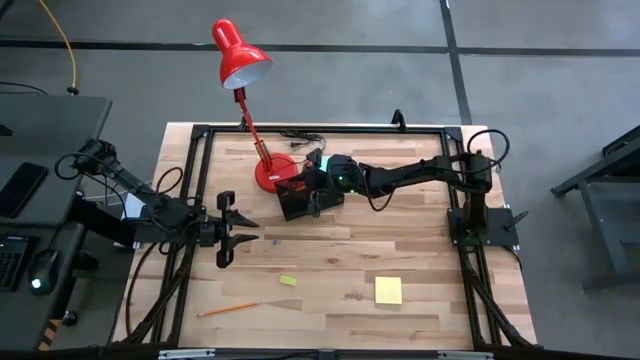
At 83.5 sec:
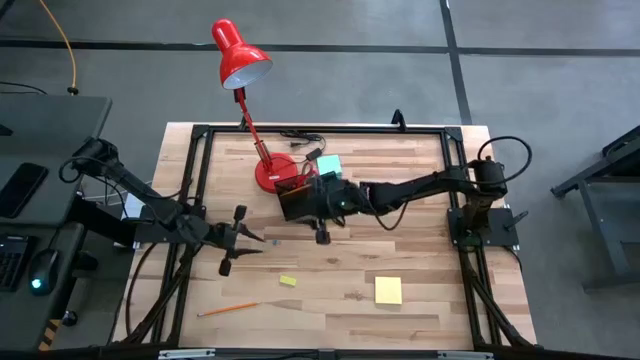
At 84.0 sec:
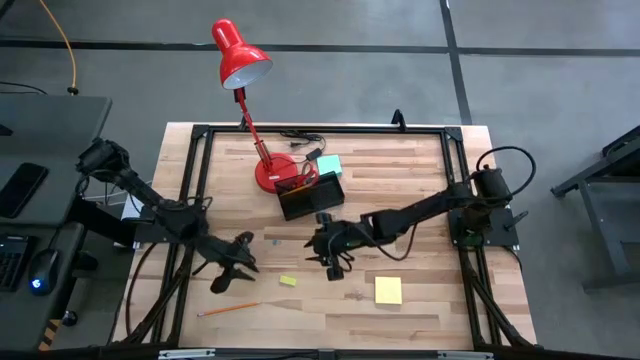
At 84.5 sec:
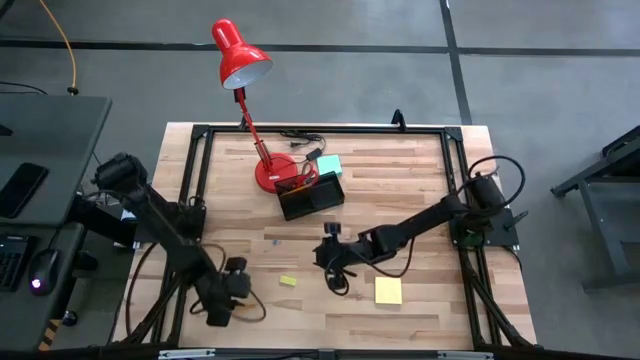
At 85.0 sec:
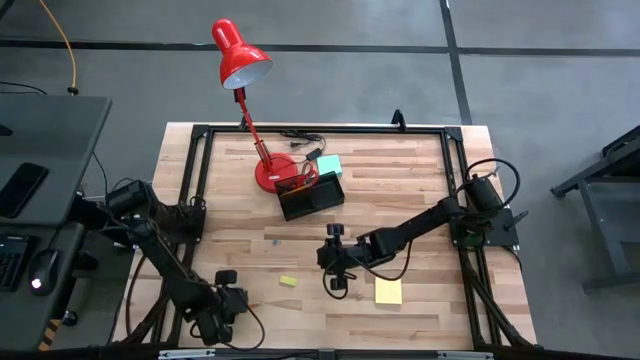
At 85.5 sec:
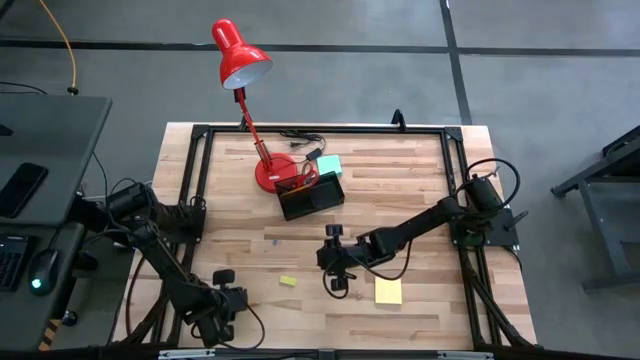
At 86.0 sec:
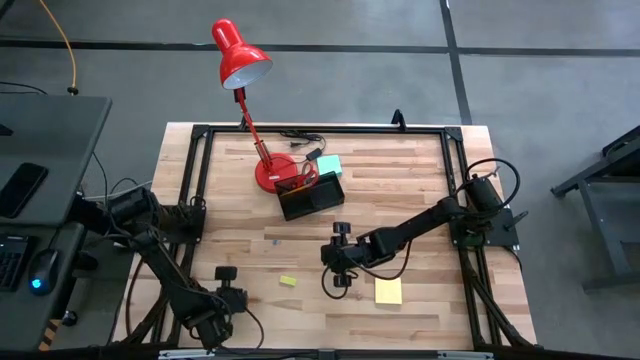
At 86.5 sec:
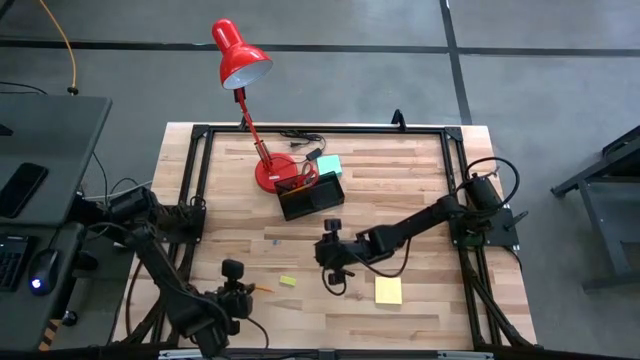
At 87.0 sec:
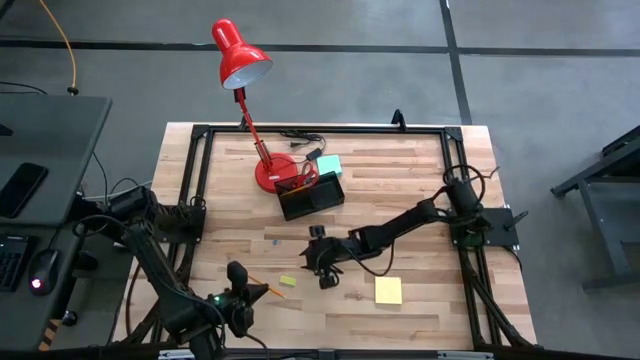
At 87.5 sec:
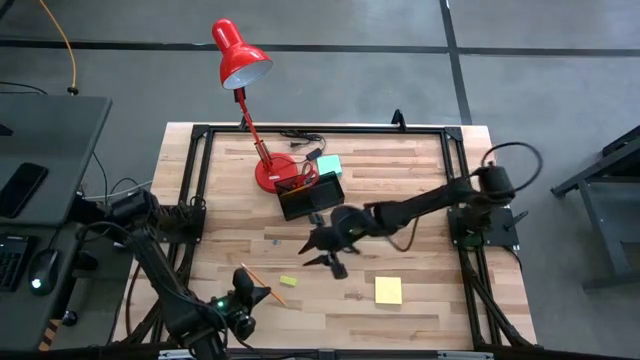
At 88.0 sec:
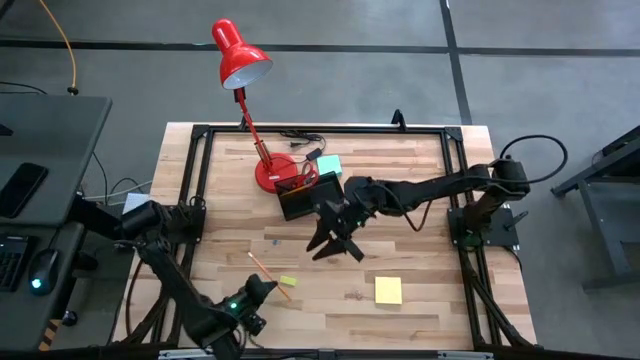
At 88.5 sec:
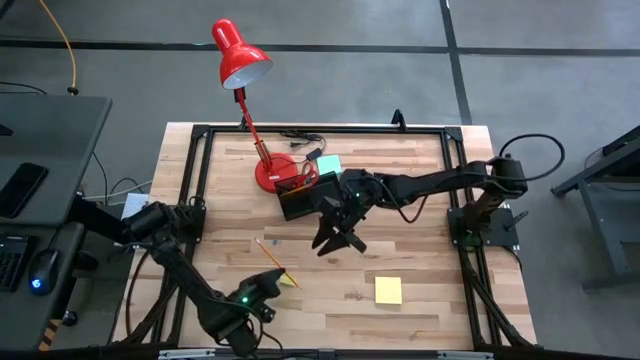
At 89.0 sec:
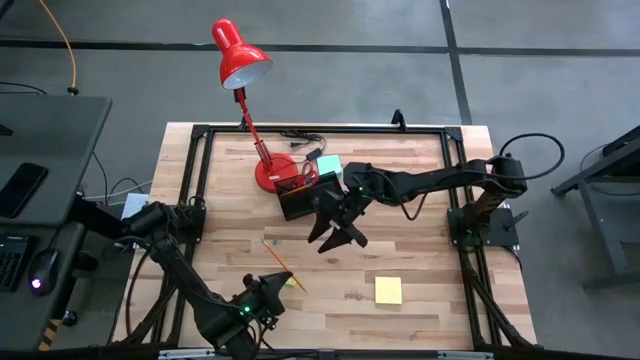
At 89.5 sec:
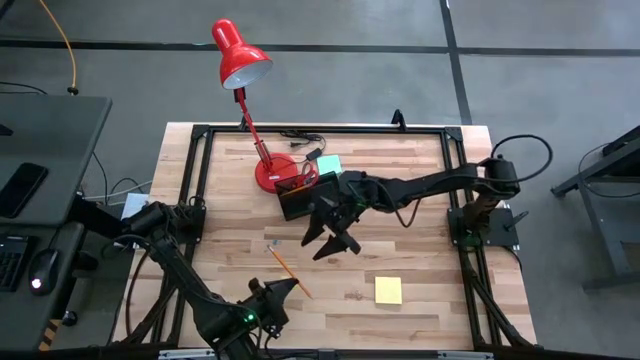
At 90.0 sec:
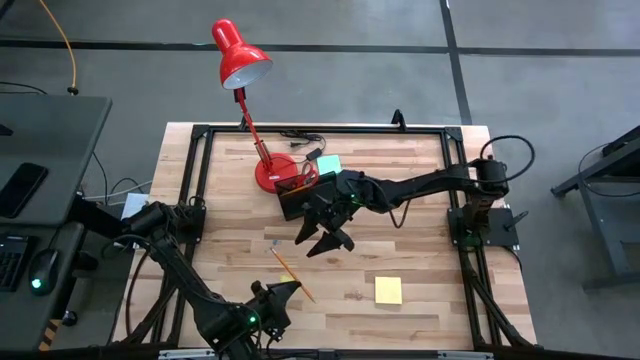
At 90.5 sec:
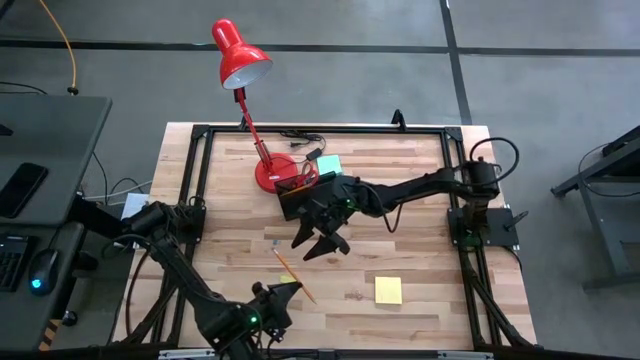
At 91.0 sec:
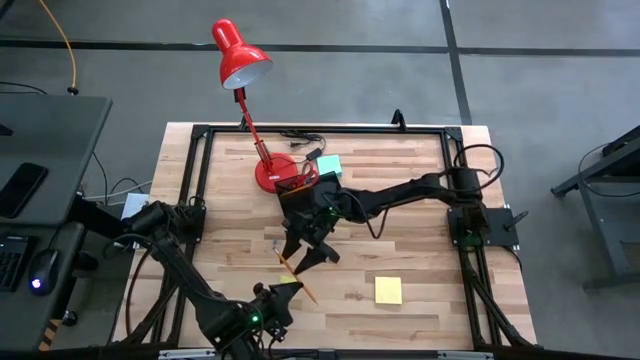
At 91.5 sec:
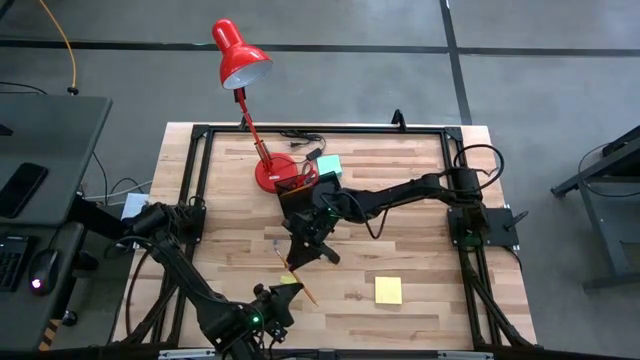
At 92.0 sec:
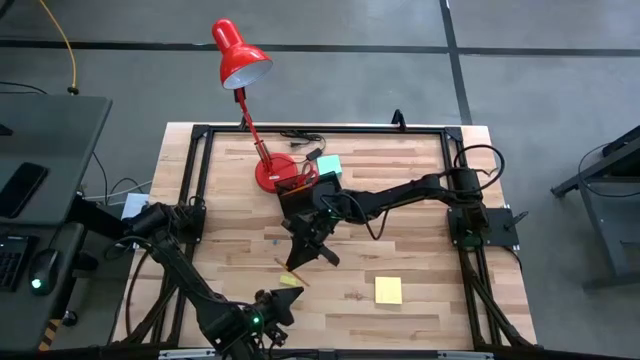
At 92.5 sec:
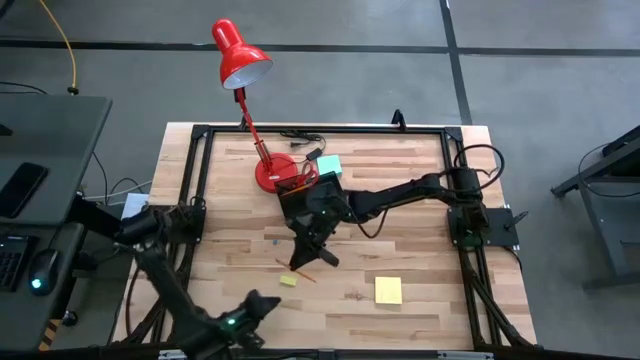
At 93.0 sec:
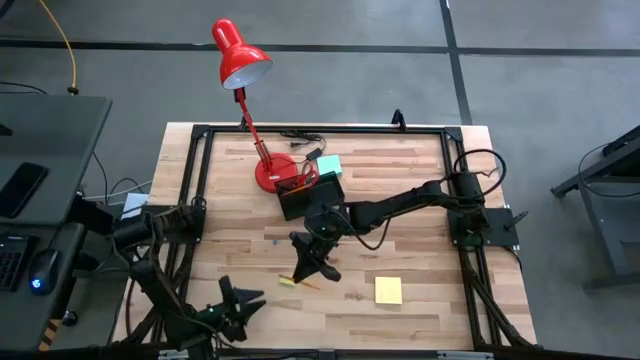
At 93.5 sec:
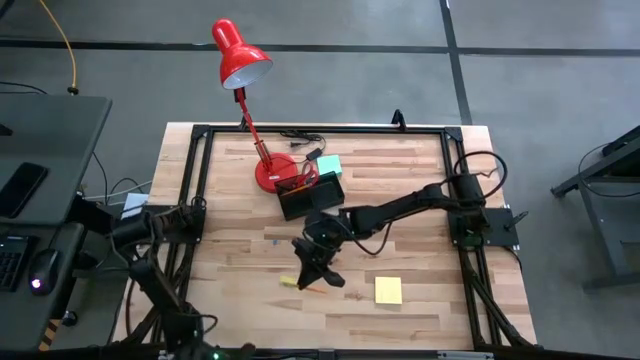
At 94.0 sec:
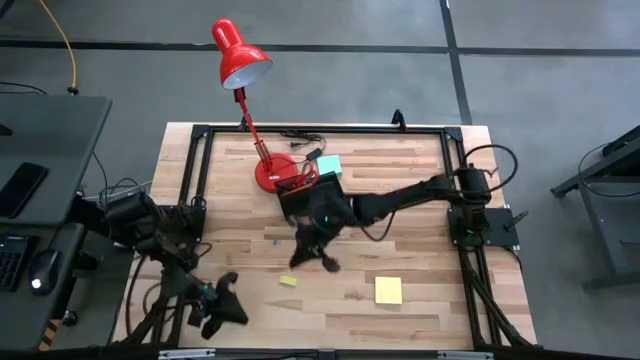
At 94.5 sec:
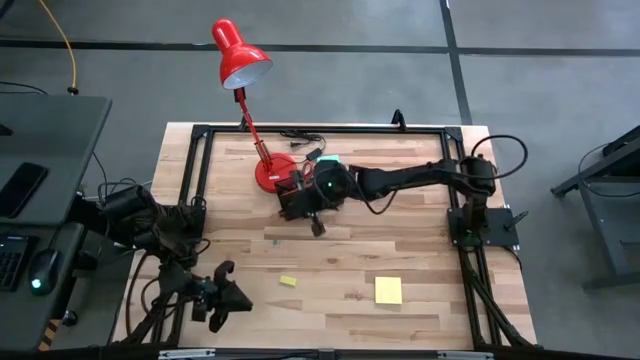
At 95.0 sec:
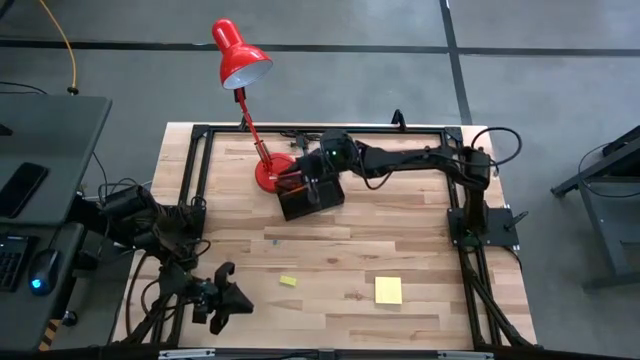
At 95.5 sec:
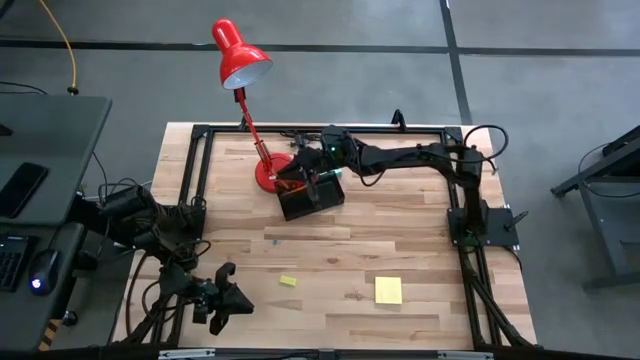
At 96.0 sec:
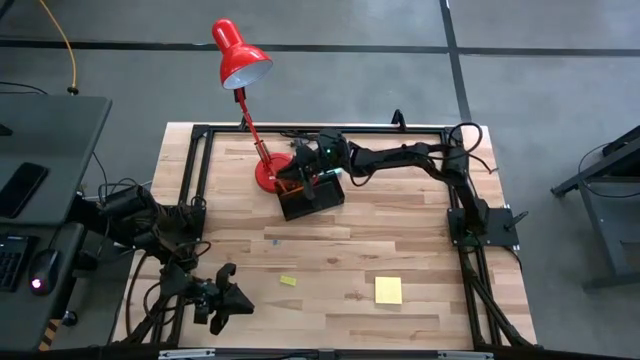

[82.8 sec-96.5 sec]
Task: Pick and place office supplies into organizer
Put the orange pencil into the desk organizer

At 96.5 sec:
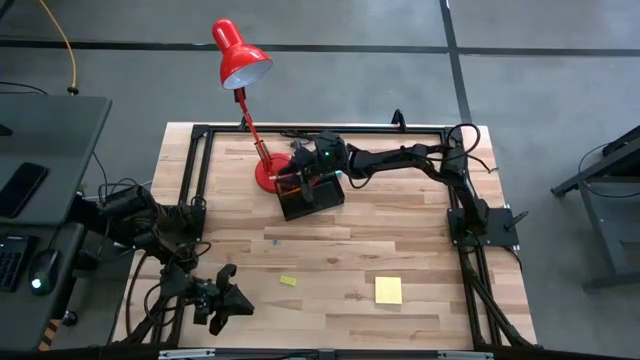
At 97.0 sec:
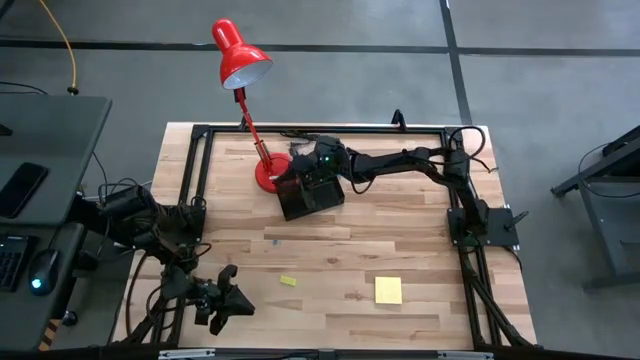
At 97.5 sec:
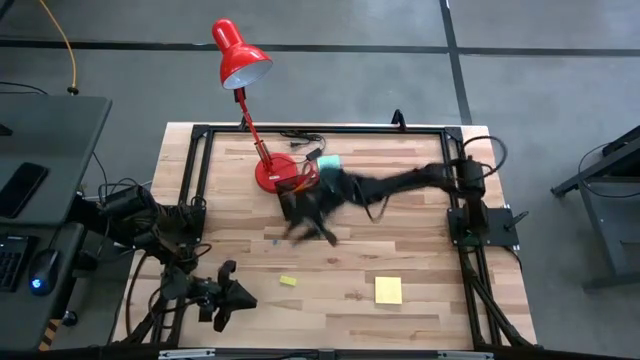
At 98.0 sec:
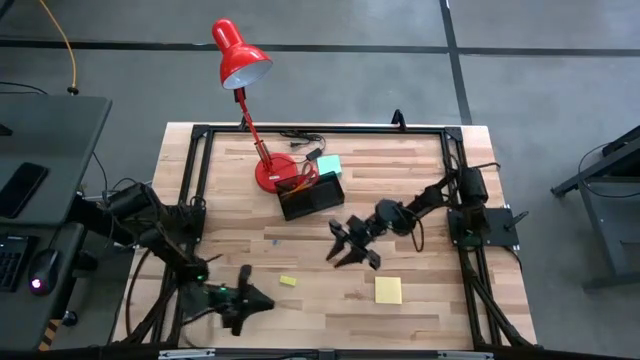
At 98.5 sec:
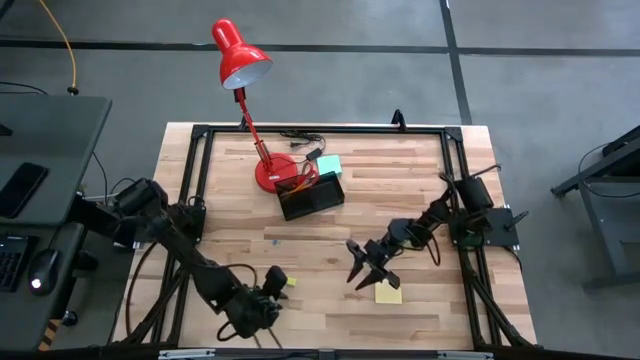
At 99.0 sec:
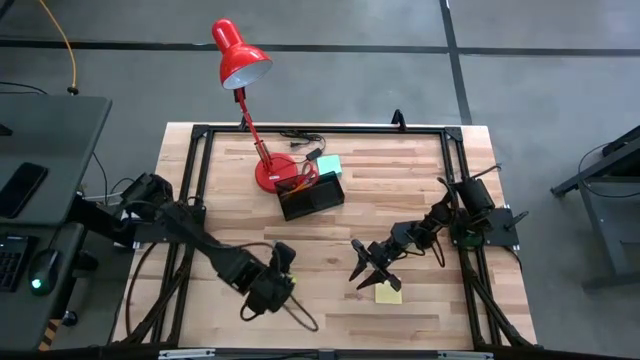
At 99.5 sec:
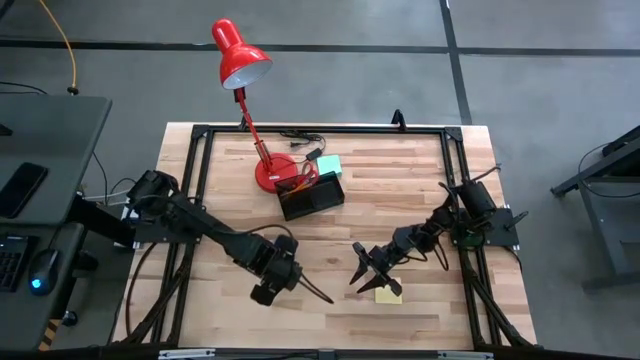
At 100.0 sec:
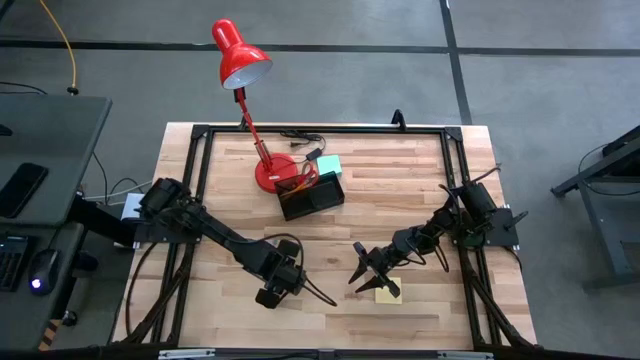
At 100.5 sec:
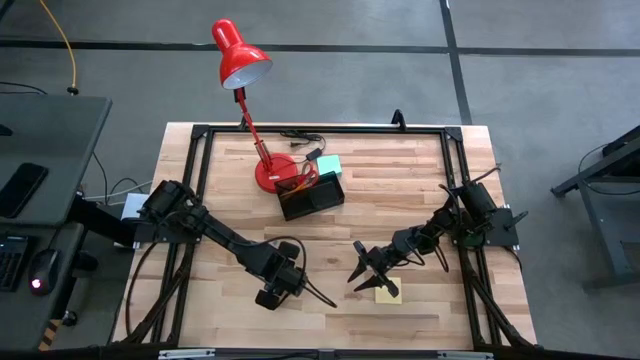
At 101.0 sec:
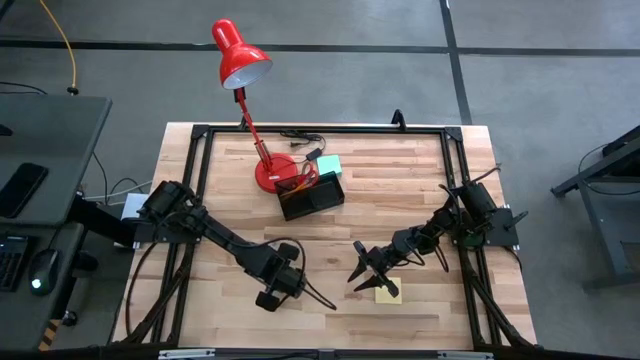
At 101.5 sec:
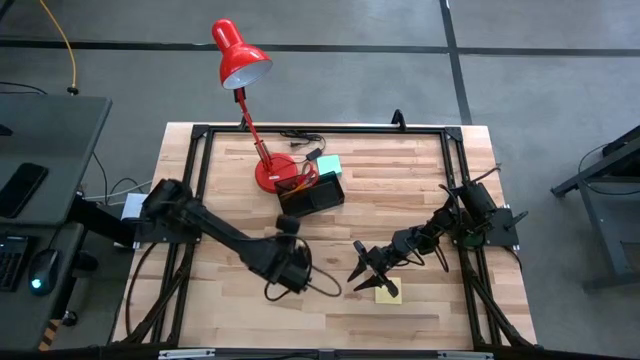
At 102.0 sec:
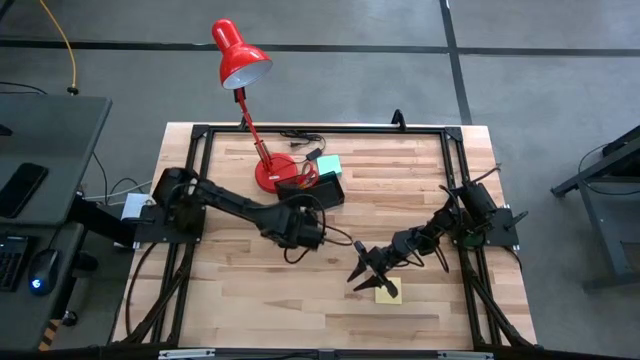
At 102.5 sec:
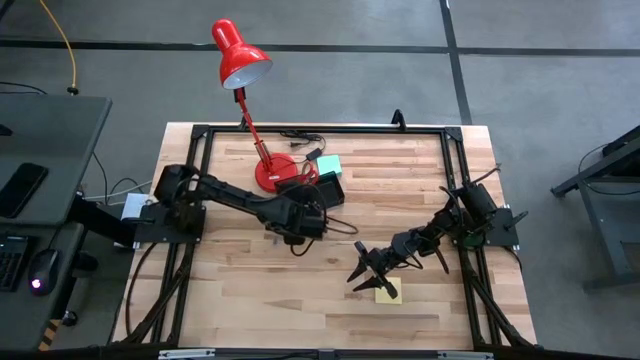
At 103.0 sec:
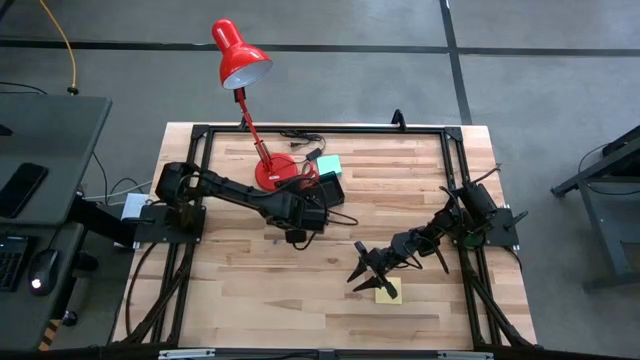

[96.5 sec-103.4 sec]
Put the yellow eraser into the desk organizer
